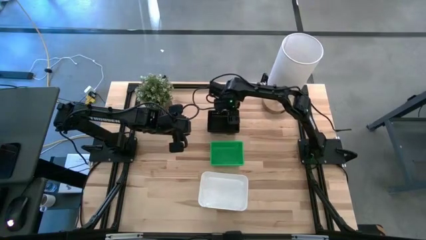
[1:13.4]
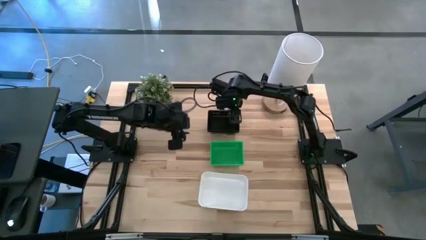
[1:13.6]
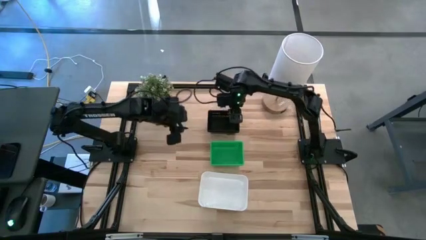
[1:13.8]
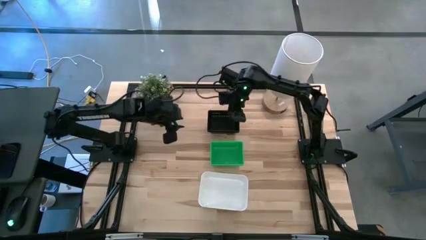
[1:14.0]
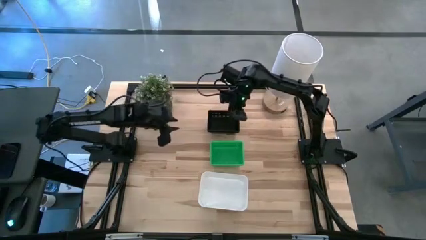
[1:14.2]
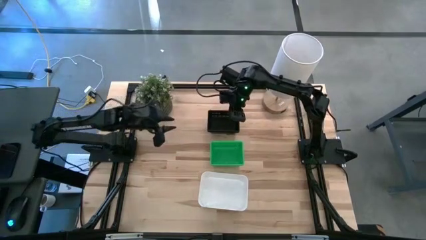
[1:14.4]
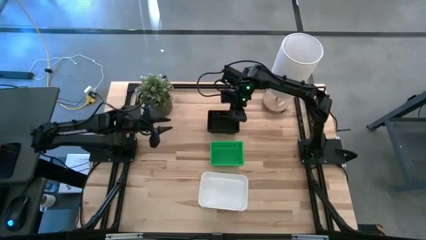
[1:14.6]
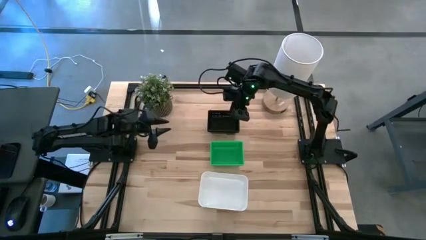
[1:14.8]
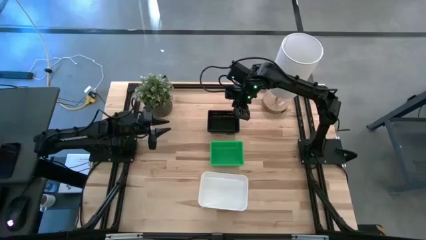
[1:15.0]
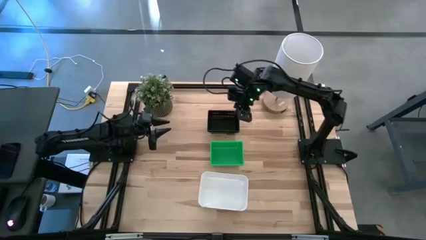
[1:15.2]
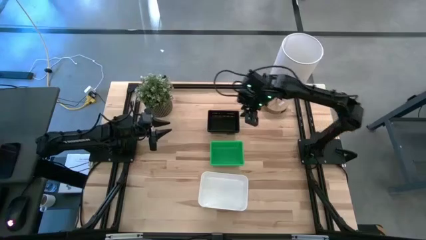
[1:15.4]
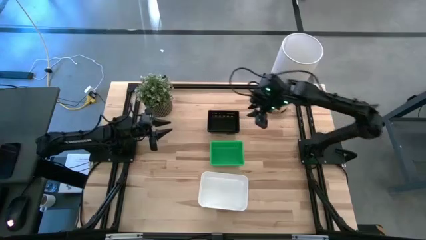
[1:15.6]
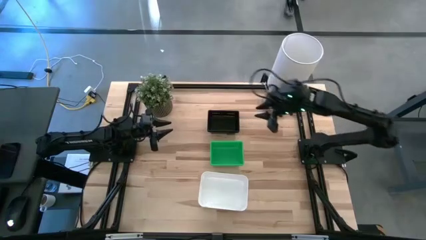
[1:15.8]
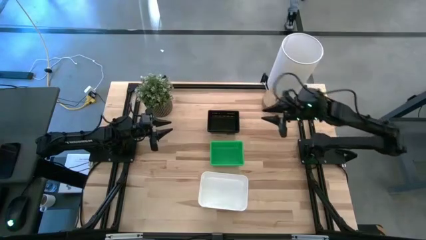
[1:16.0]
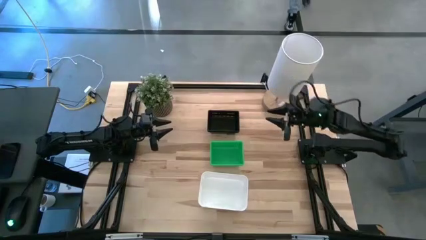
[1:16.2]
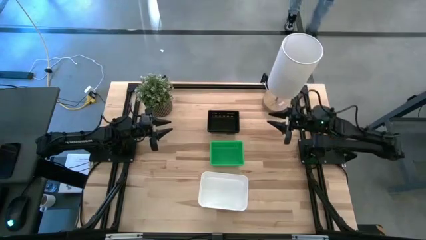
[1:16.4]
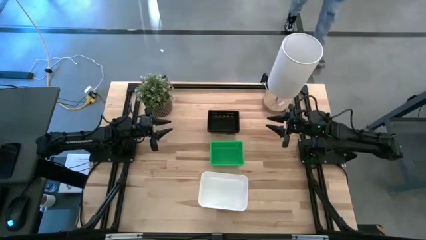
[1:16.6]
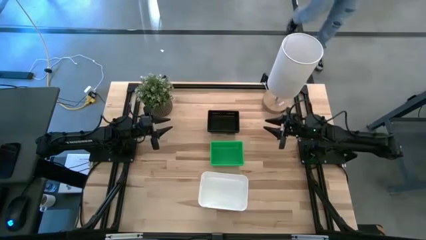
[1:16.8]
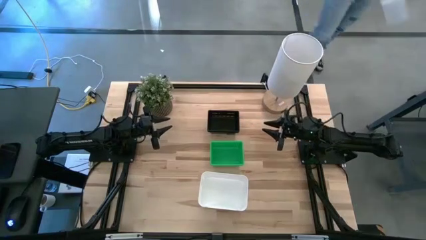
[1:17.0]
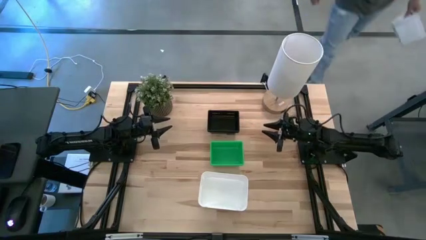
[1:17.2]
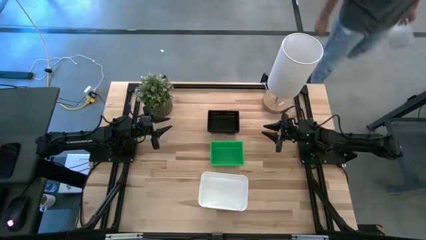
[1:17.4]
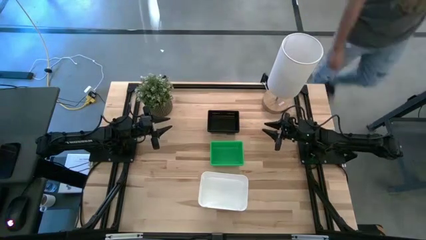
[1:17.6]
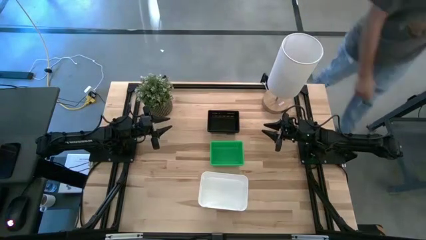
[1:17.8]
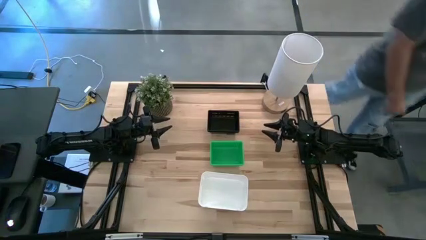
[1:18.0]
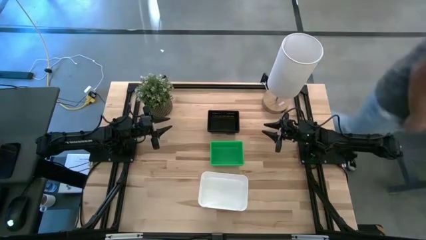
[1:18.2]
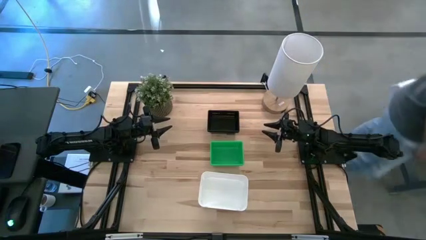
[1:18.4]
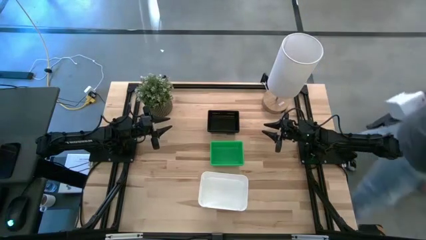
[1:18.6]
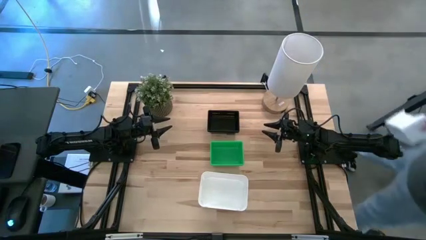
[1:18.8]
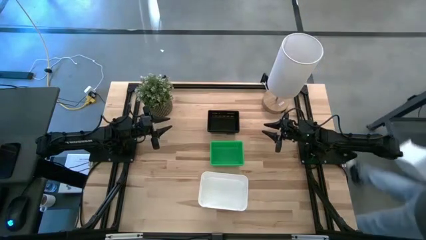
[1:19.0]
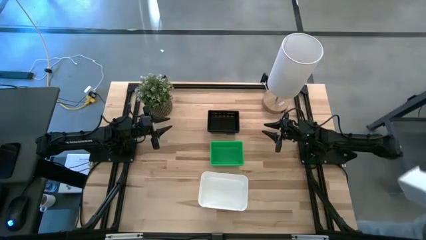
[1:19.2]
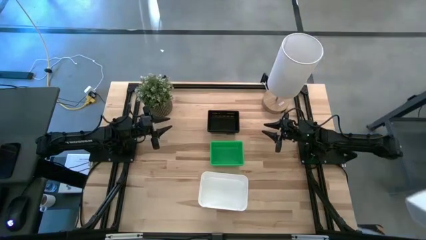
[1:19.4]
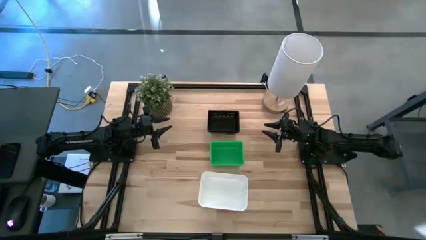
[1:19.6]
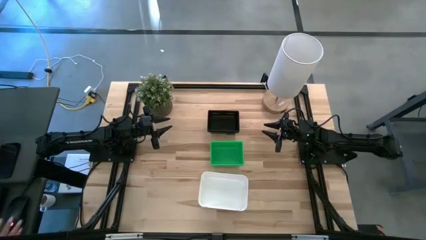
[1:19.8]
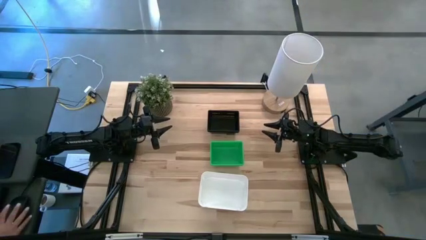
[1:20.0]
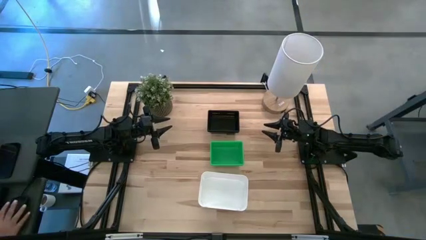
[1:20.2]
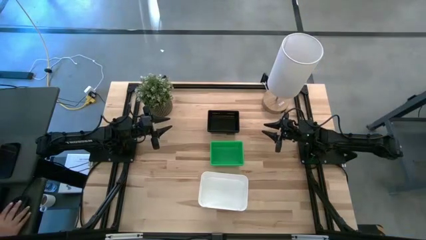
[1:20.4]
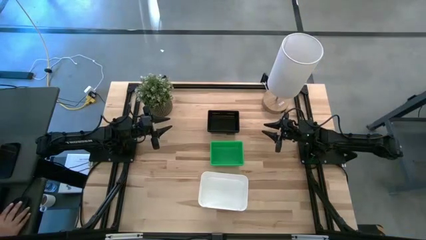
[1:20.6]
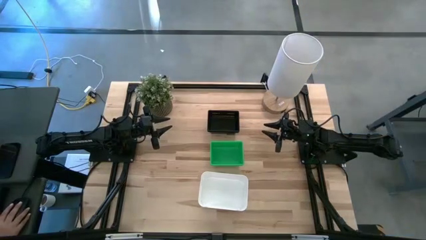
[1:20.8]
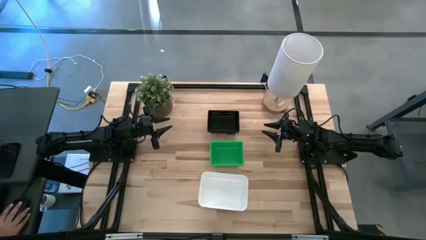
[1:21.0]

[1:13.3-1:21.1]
Return to Home Position

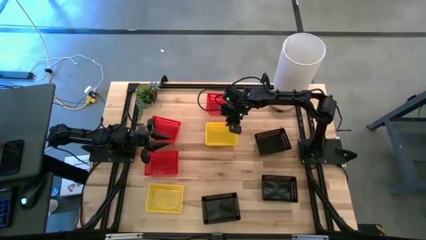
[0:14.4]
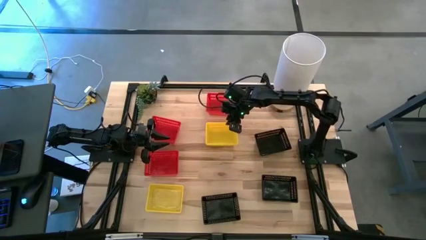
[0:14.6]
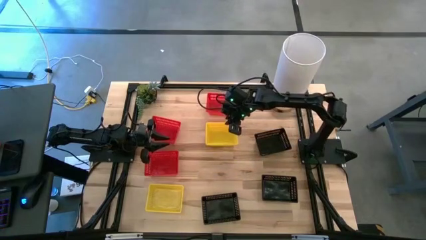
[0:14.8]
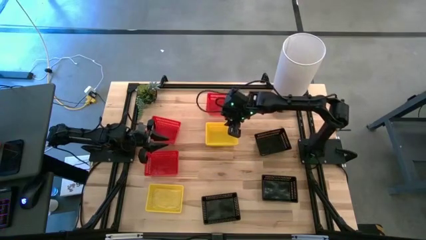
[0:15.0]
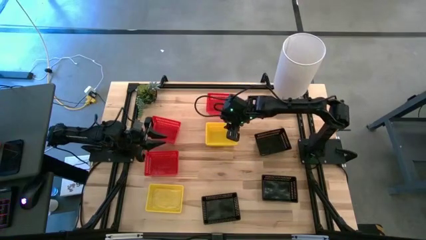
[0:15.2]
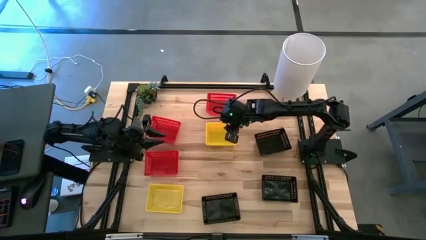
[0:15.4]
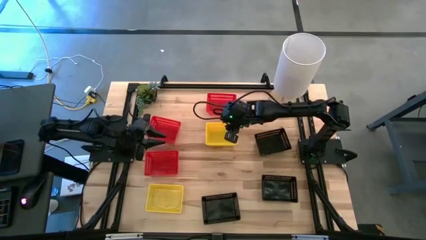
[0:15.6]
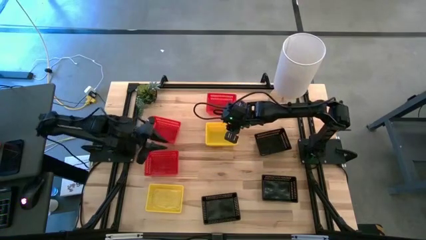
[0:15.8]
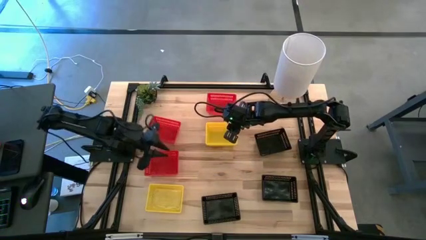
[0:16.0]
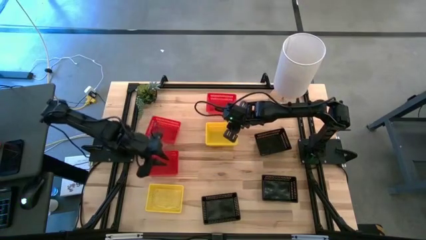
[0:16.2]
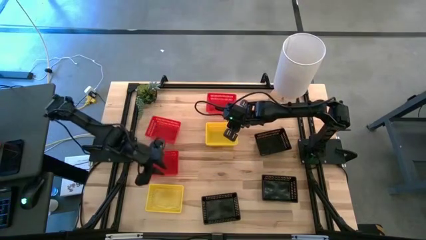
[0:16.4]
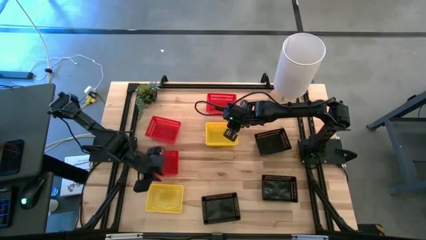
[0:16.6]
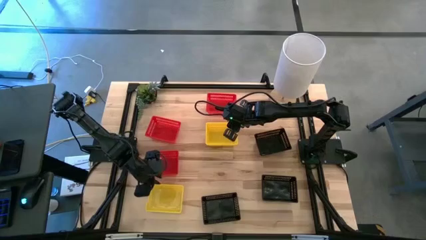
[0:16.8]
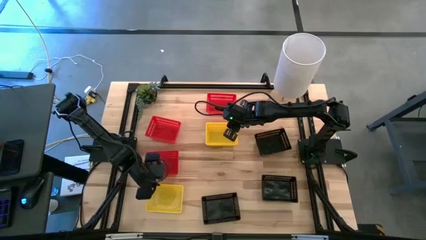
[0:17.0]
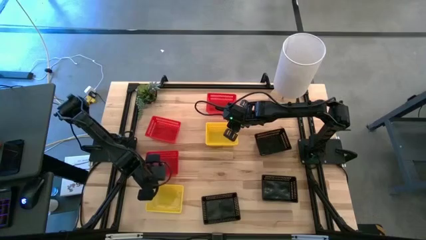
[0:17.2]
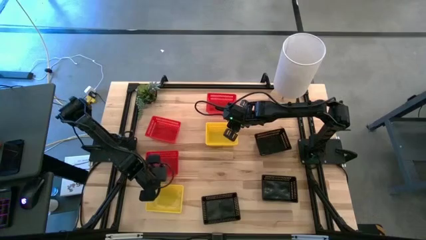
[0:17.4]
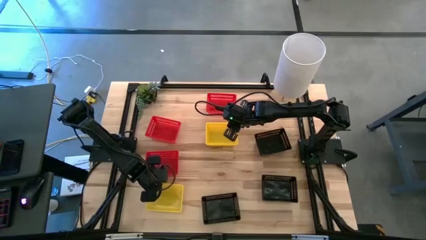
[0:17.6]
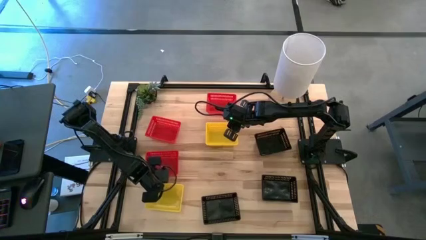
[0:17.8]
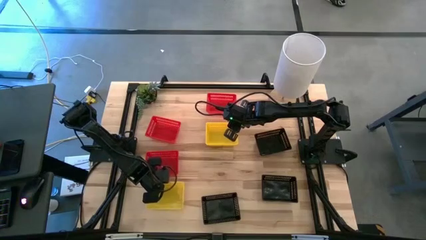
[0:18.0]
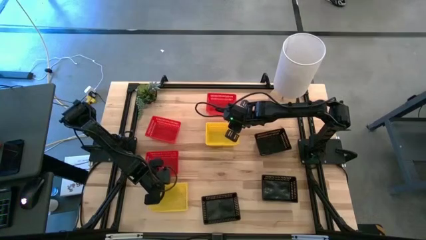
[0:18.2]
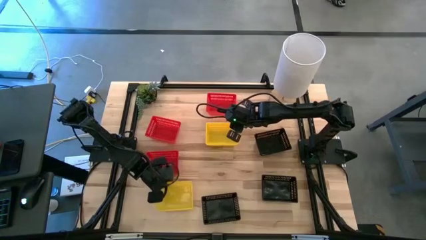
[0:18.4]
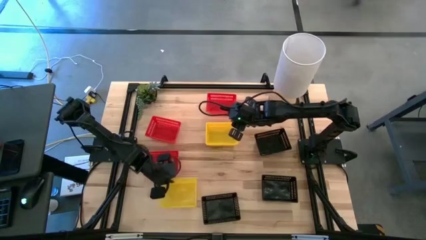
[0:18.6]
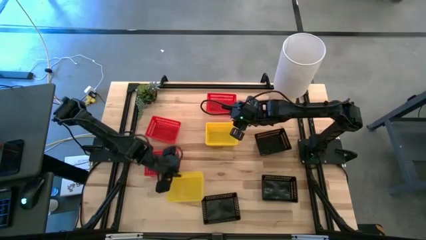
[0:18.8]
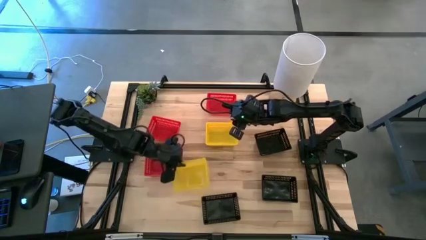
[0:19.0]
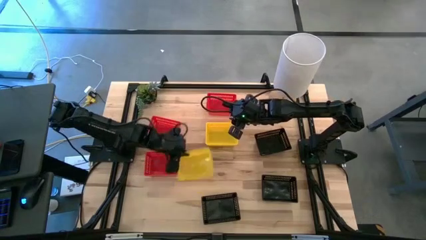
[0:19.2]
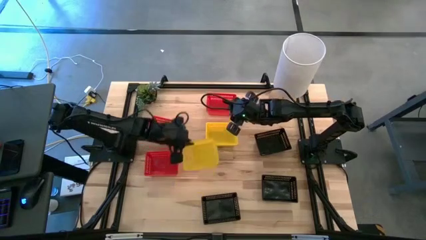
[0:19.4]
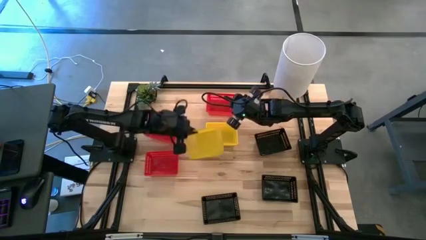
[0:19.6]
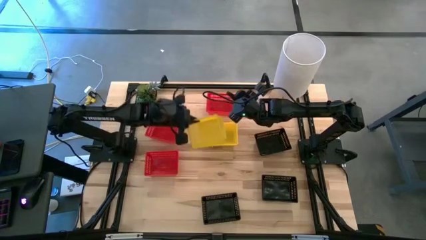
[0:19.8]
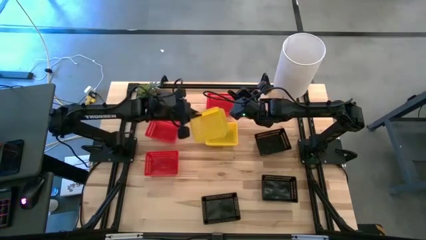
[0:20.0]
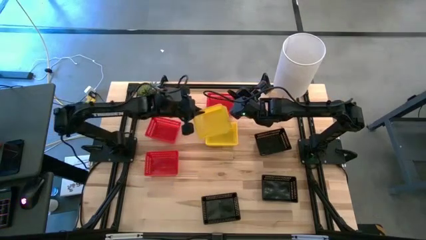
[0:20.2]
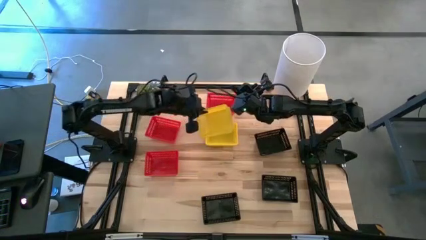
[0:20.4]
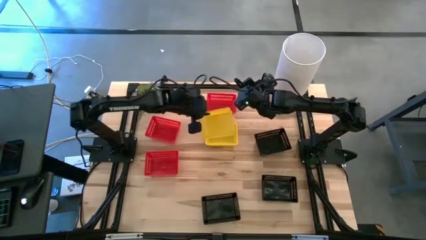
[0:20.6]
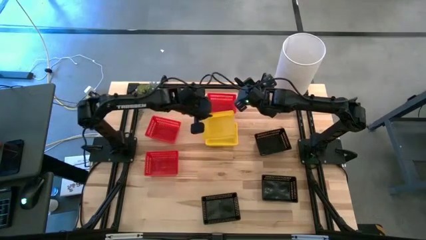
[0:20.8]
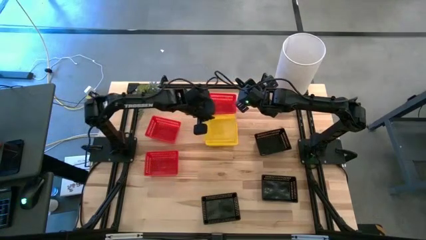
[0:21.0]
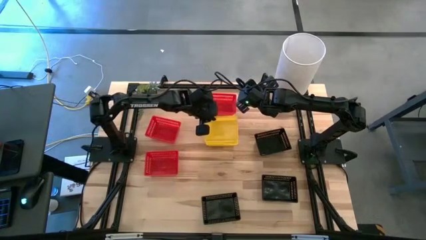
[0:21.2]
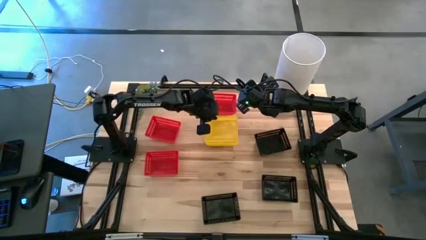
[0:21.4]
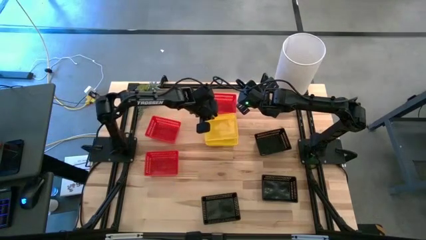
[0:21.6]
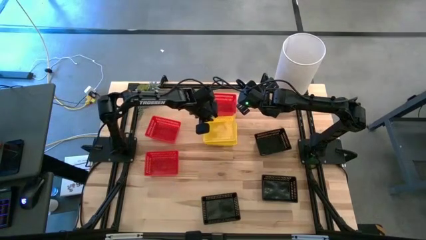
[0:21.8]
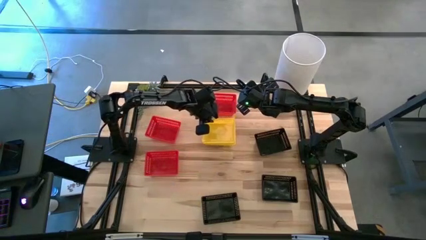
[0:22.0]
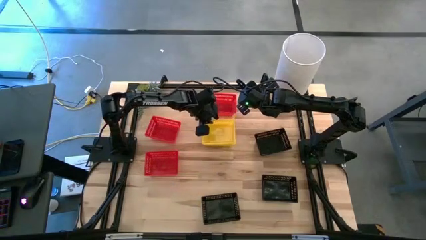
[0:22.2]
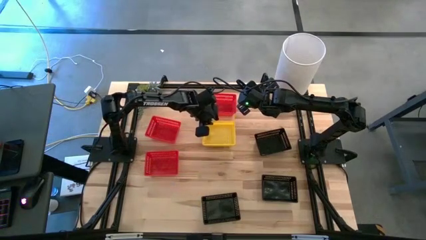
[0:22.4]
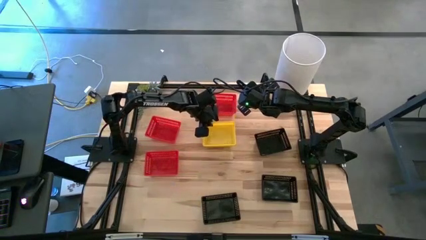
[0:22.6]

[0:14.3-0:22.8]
Stack the bottom yellow bin on the stacked yellow bin
